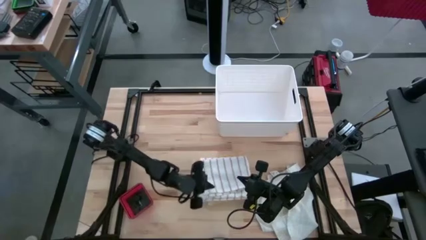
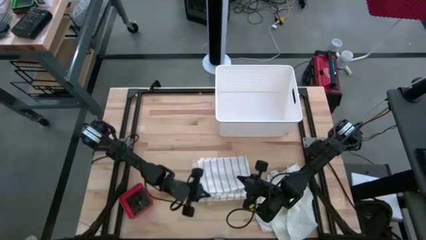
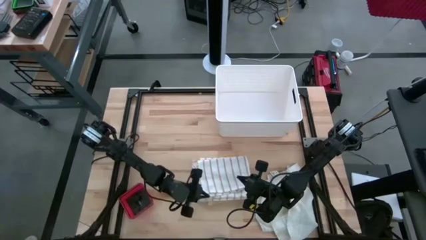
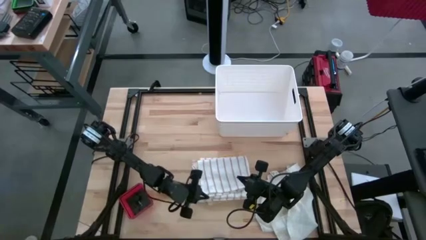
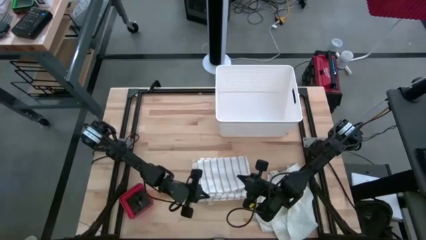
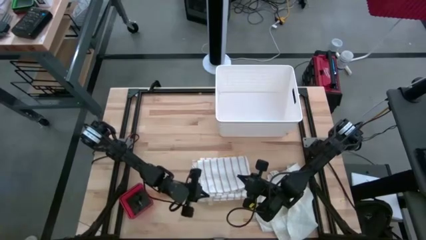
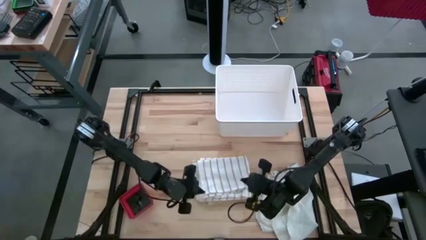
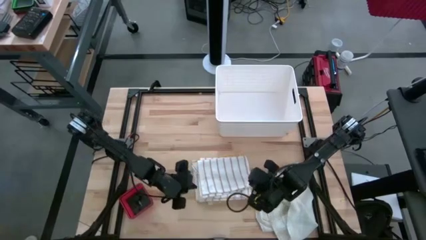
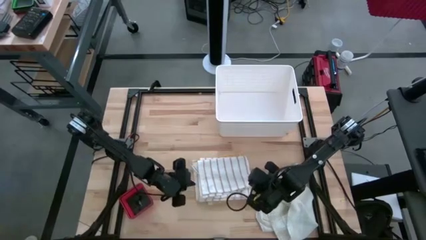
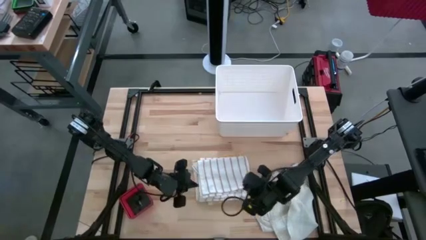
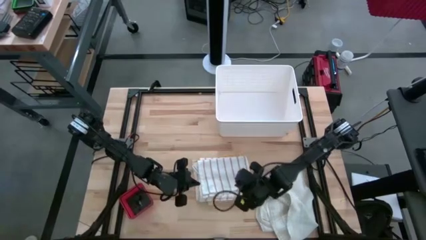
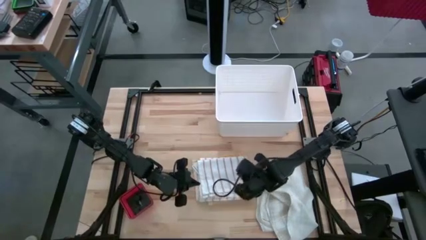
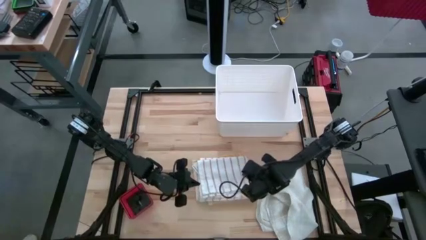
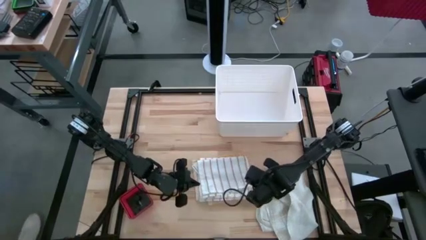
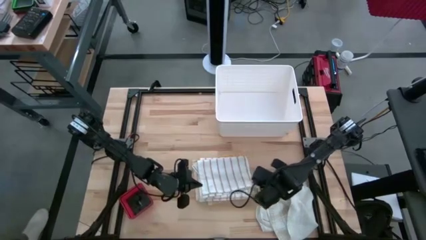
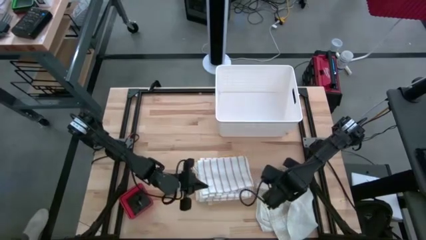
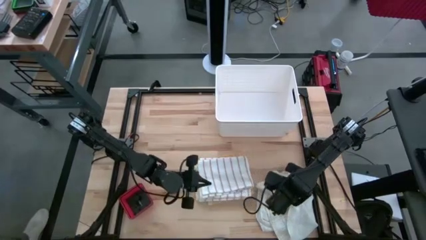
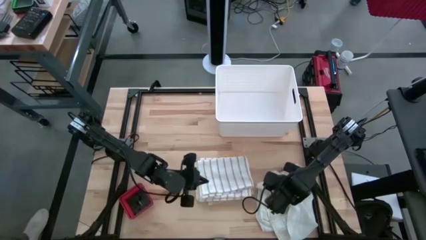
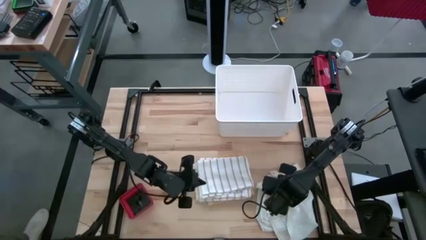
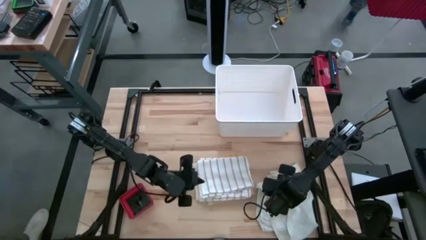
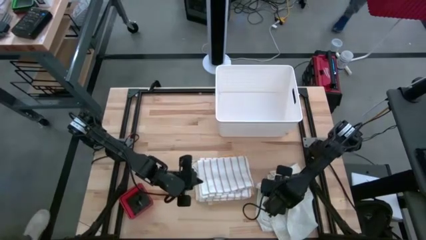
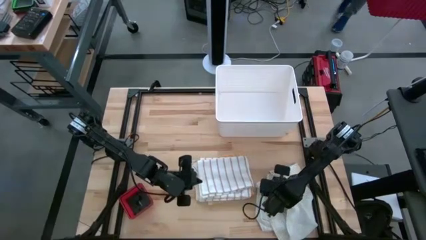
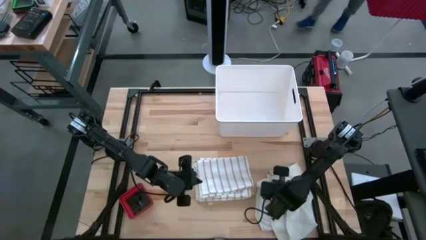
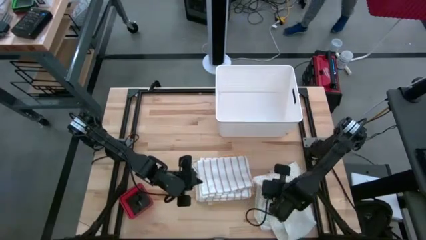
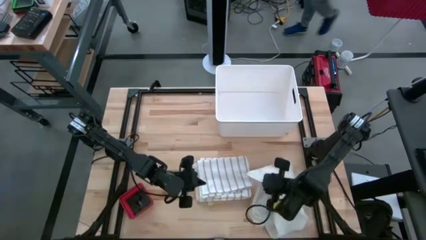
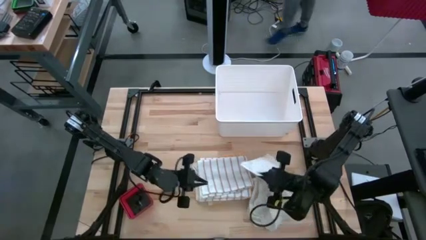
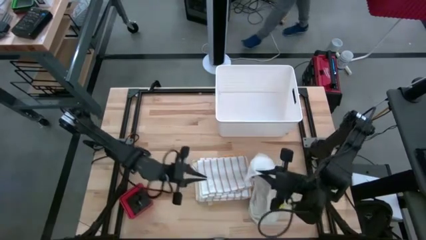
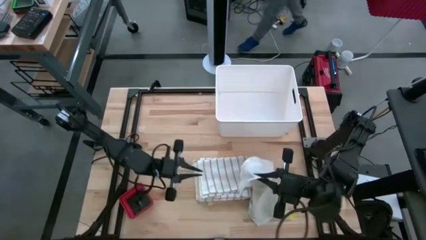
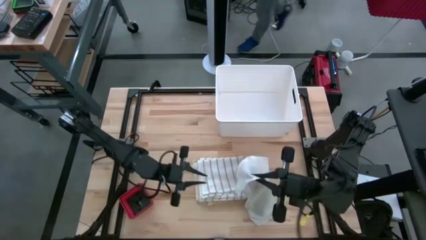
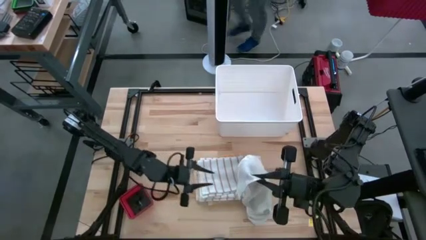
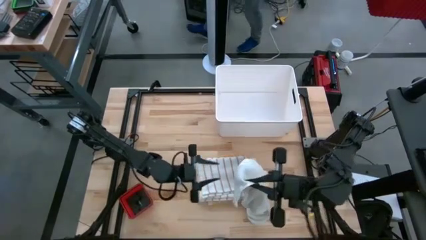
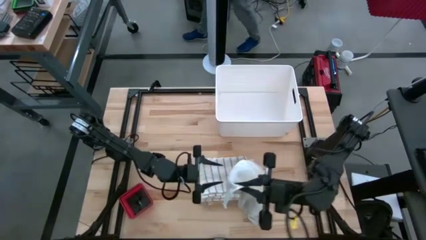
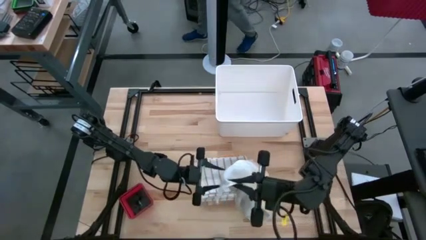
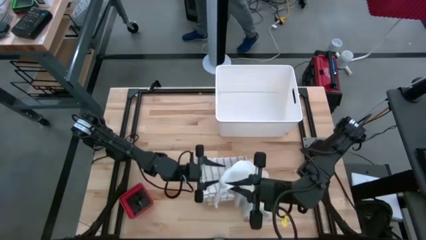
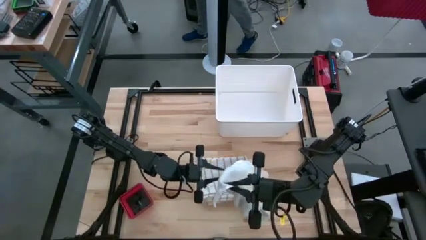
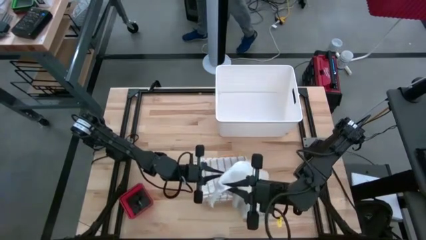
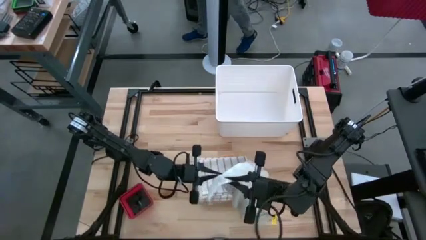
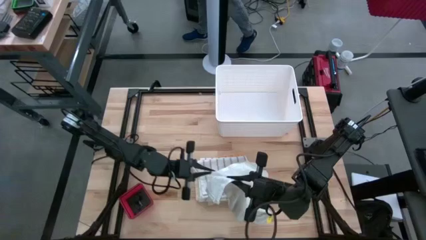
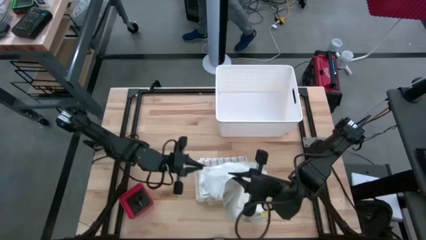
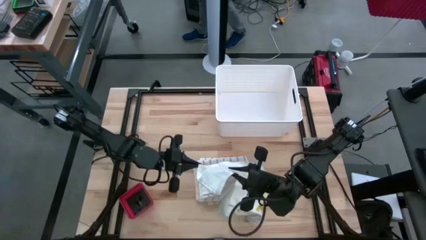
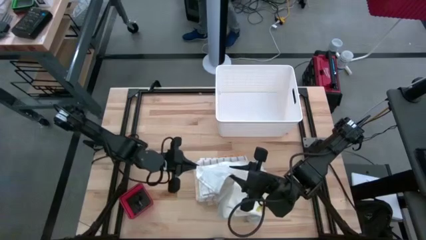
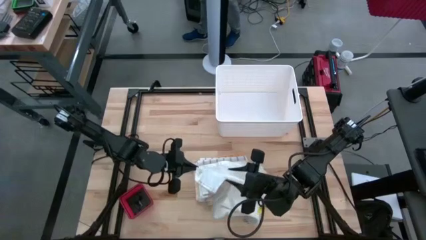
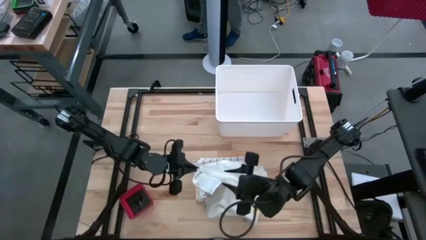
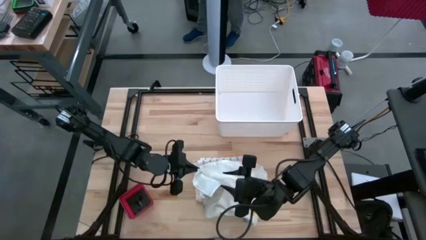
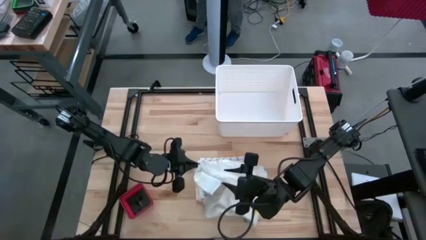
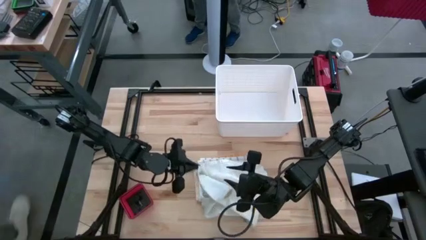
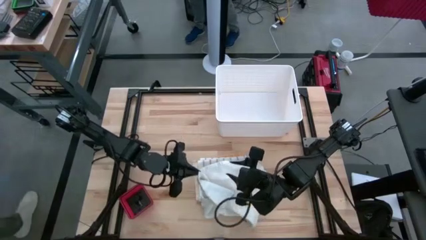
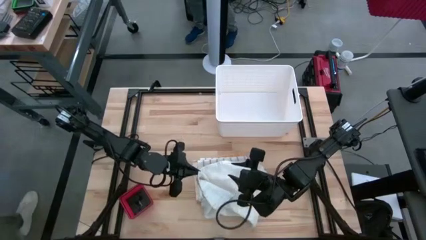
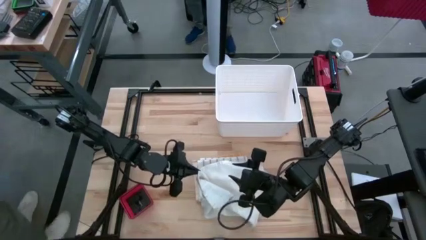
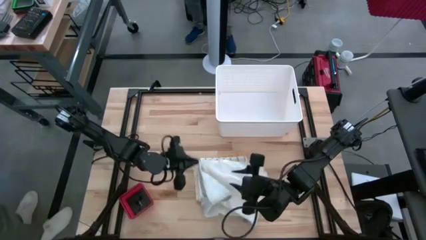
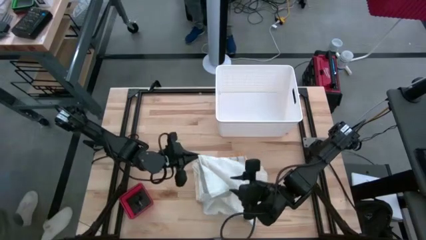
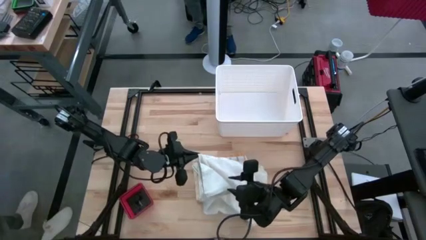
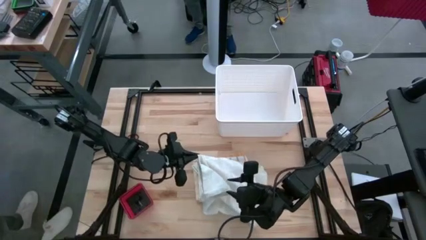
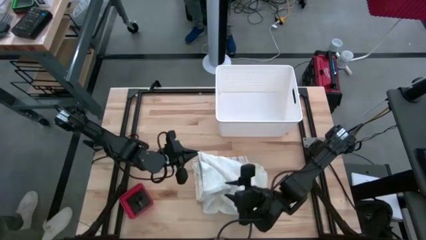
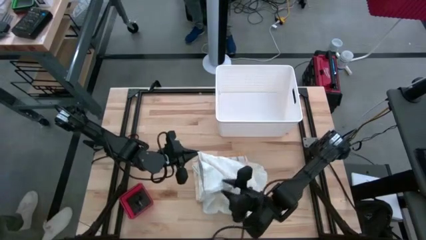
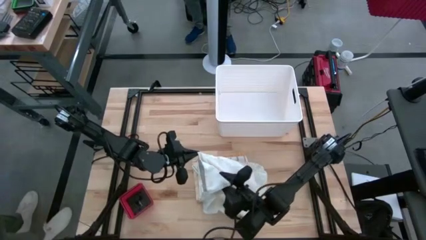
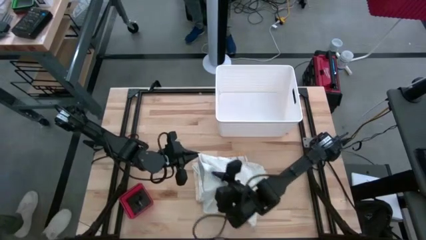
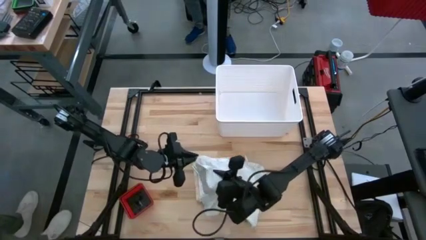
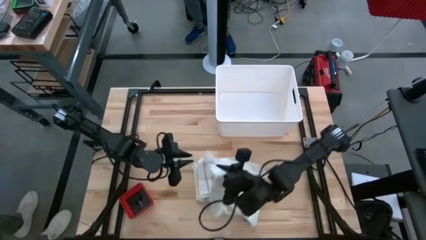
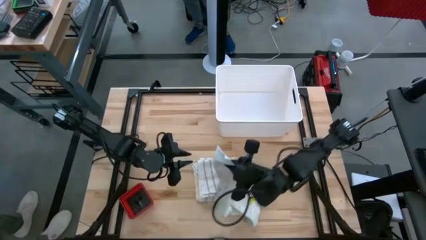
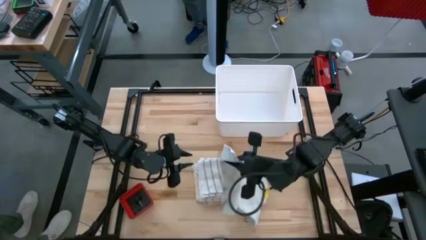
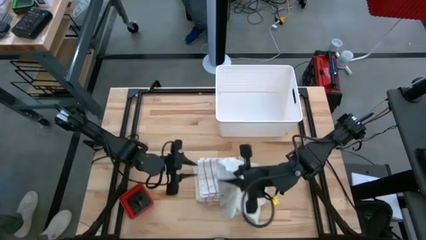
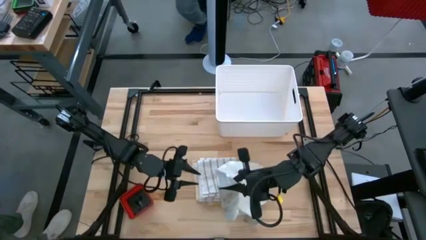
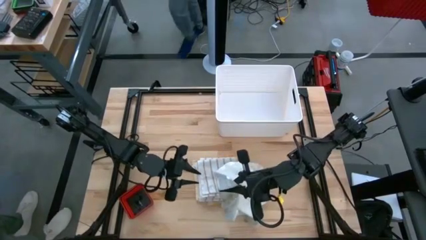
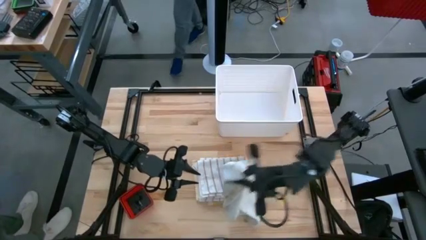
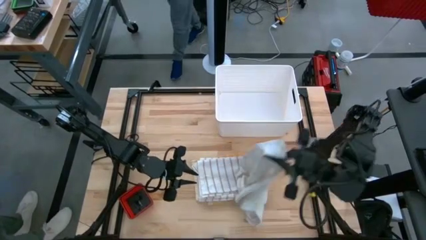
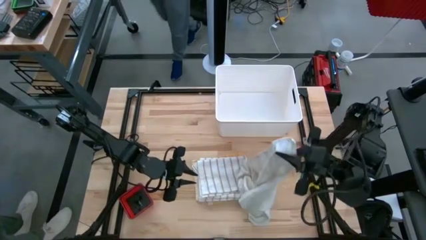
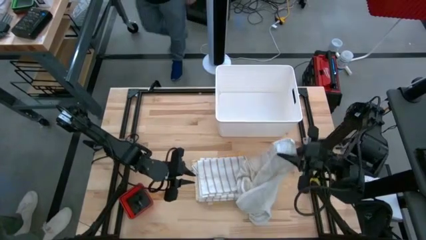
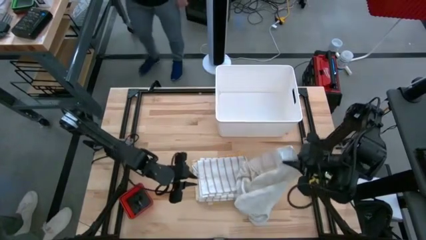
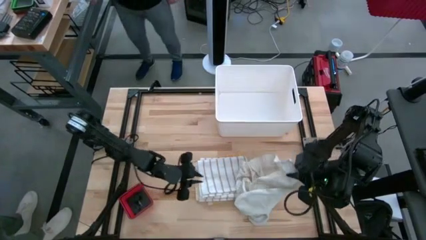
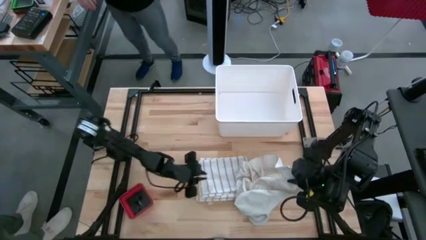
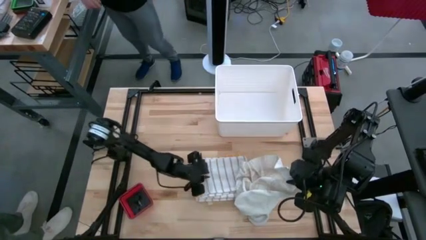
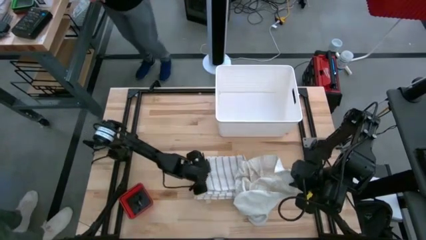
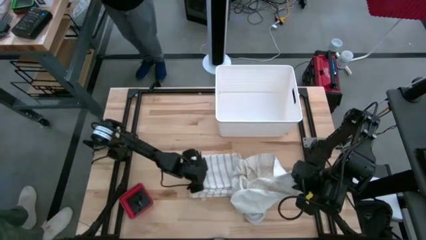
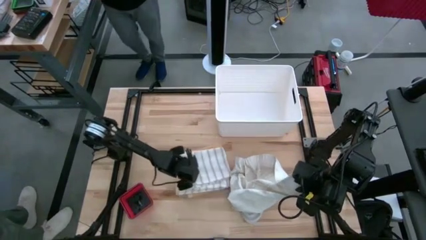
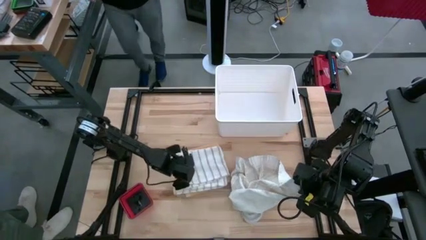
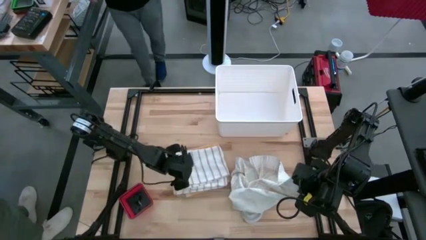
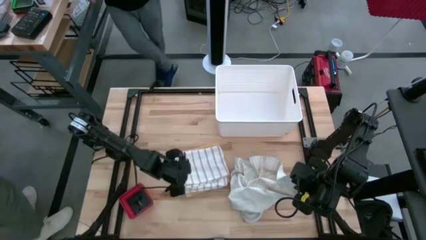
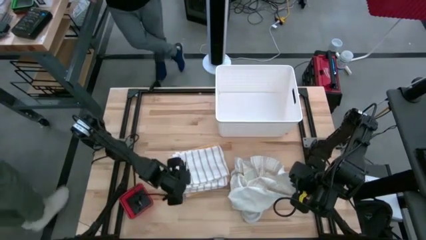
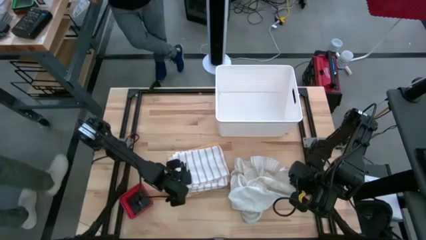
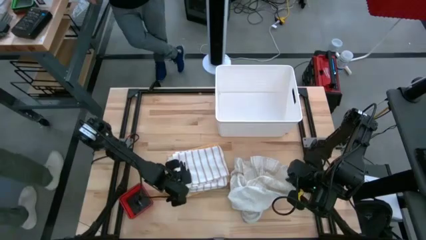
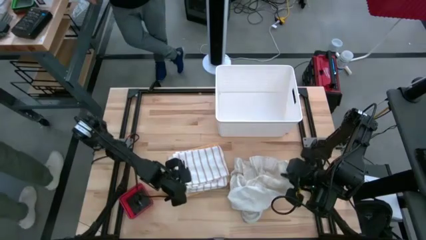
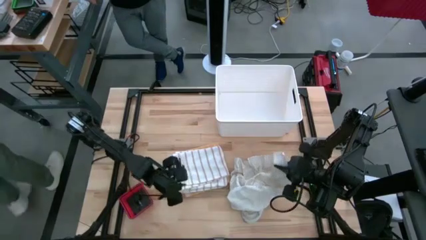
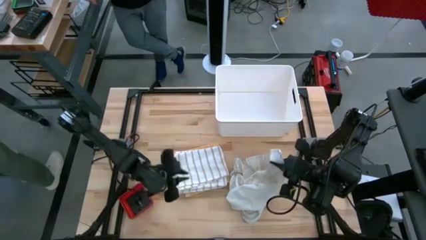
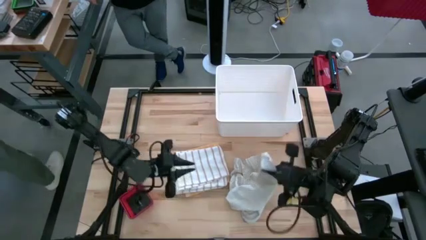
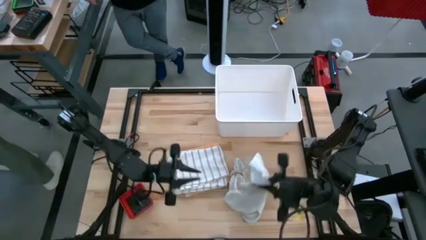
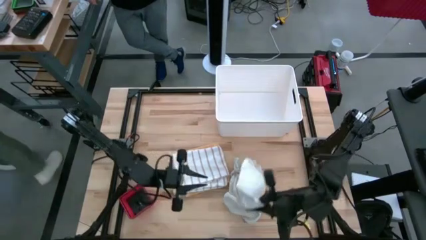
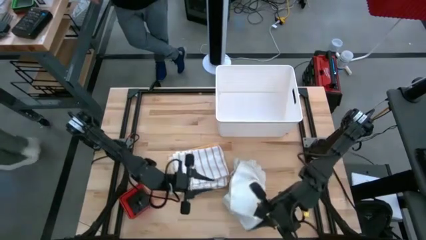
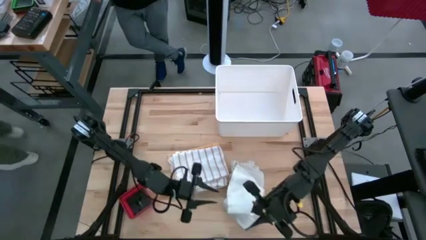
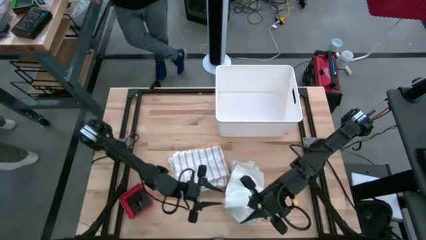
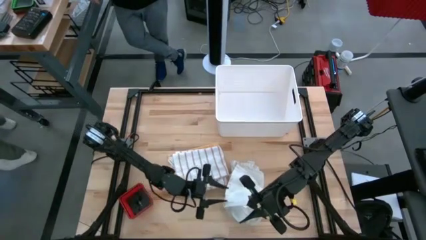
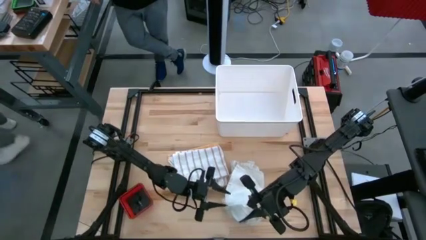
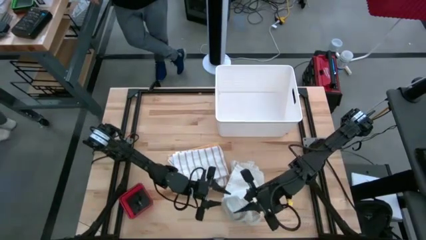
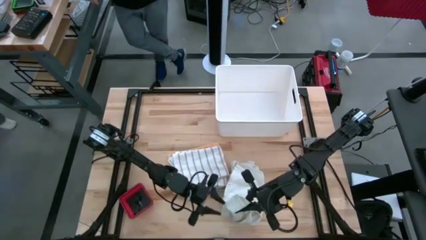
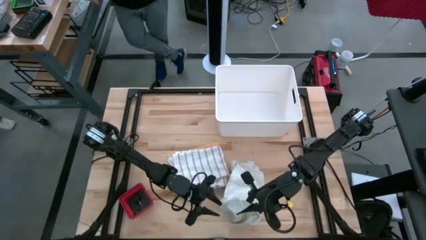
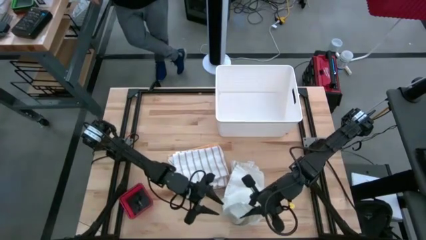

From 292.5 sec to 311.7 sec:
Task: Fold towel
Fold the light gray patterned towel
